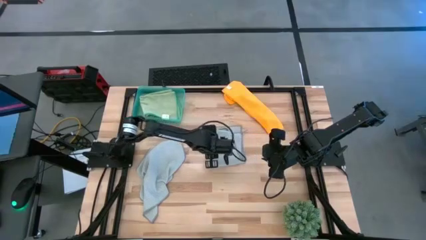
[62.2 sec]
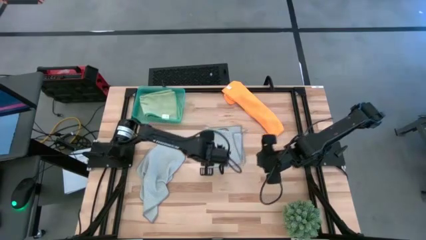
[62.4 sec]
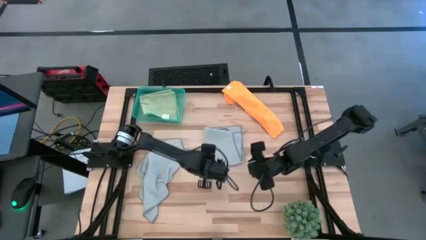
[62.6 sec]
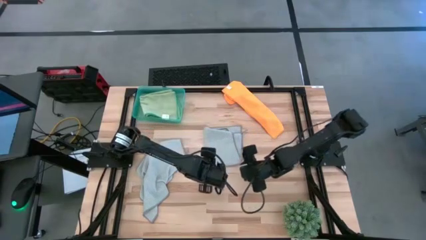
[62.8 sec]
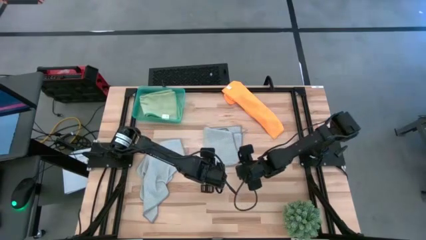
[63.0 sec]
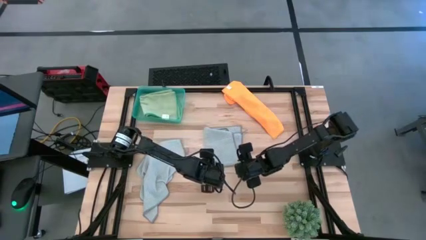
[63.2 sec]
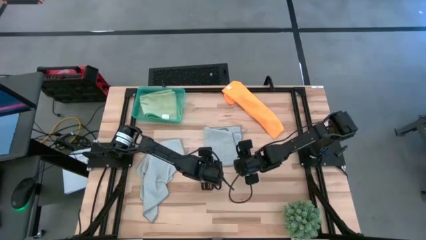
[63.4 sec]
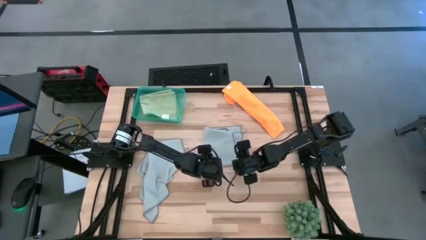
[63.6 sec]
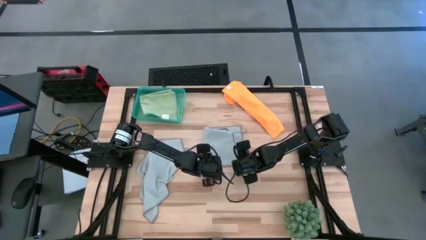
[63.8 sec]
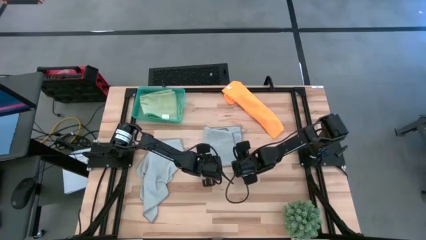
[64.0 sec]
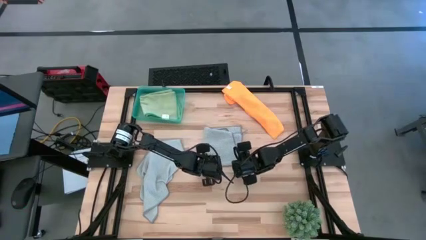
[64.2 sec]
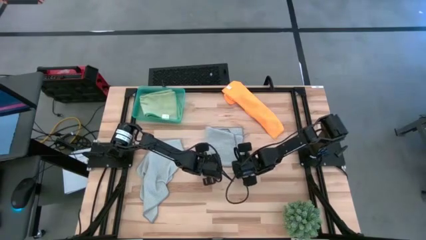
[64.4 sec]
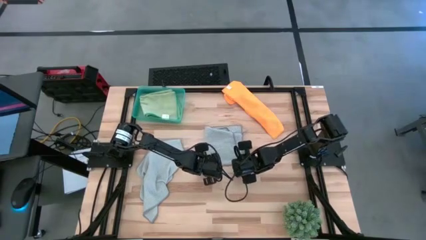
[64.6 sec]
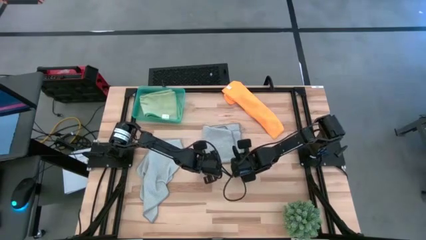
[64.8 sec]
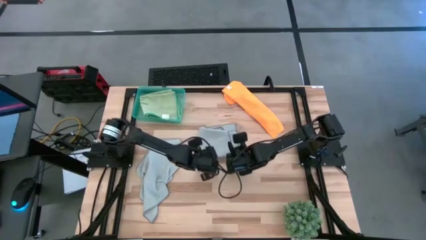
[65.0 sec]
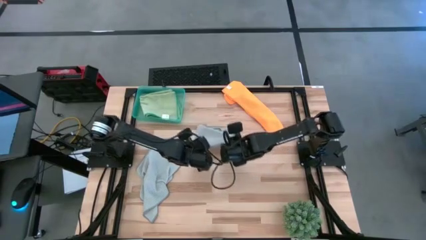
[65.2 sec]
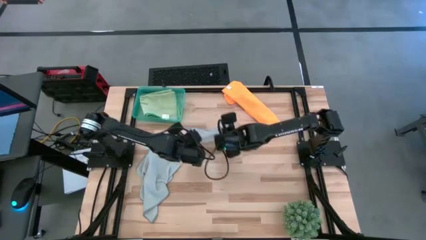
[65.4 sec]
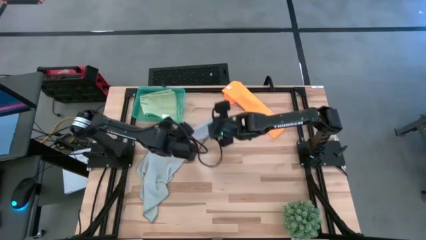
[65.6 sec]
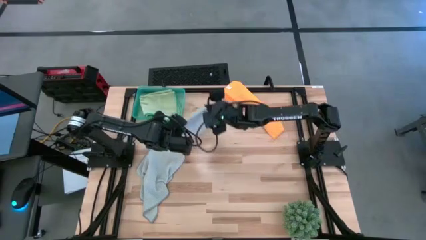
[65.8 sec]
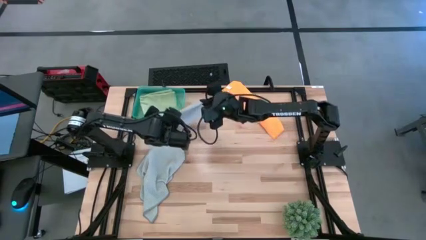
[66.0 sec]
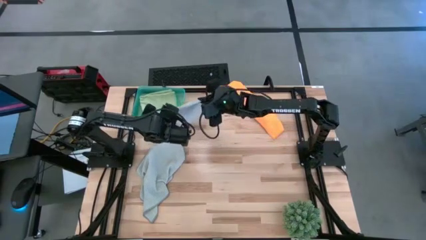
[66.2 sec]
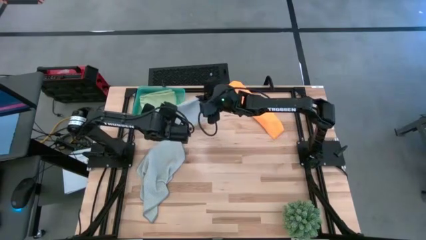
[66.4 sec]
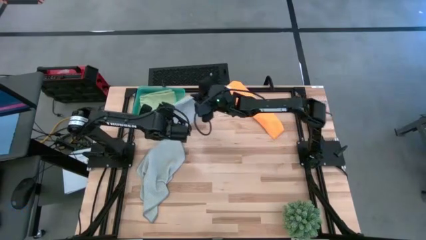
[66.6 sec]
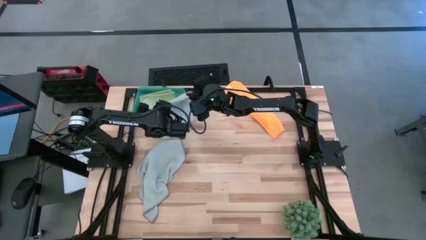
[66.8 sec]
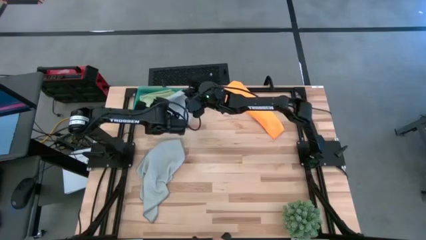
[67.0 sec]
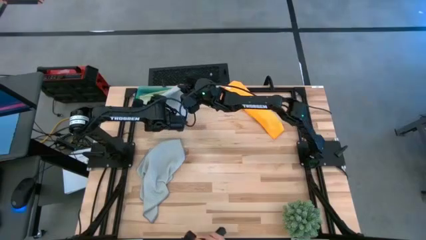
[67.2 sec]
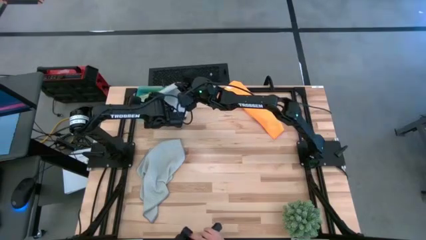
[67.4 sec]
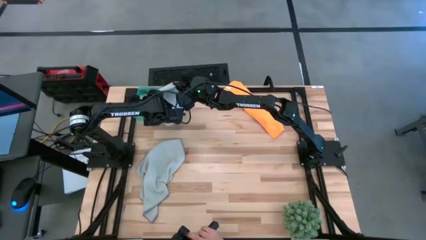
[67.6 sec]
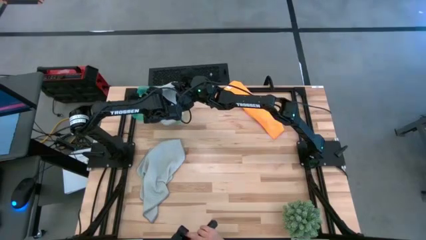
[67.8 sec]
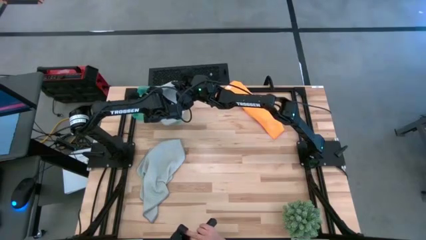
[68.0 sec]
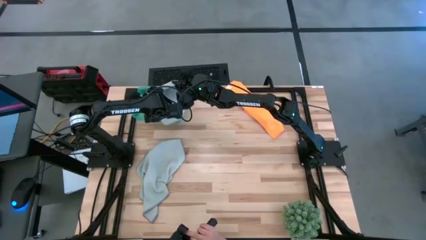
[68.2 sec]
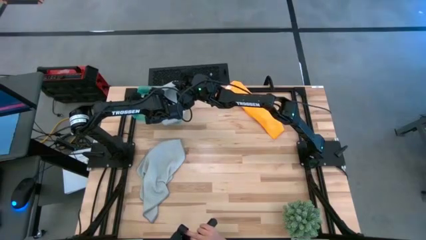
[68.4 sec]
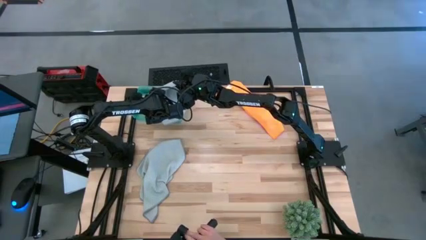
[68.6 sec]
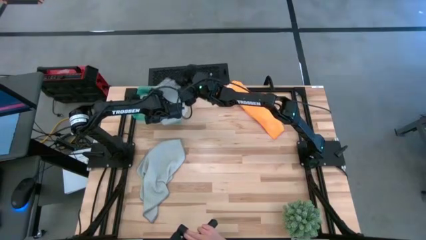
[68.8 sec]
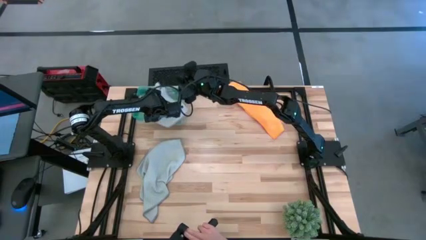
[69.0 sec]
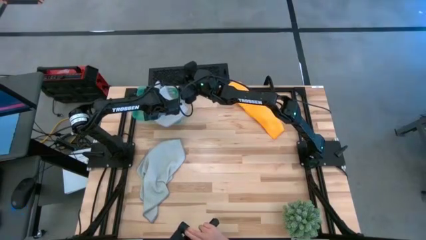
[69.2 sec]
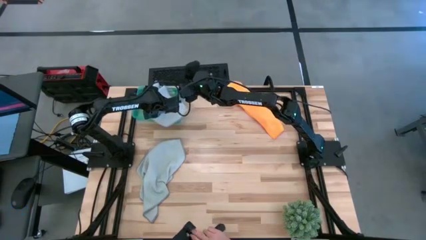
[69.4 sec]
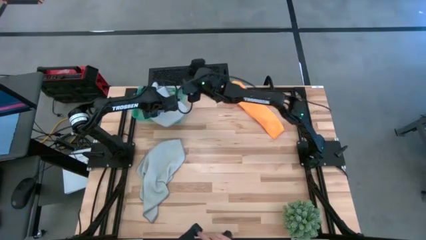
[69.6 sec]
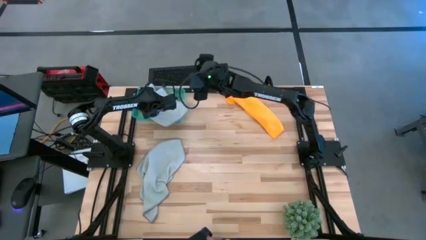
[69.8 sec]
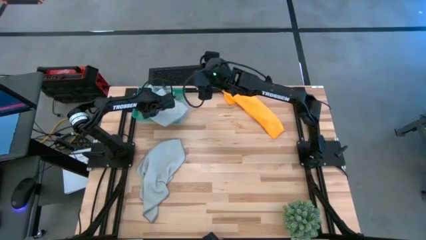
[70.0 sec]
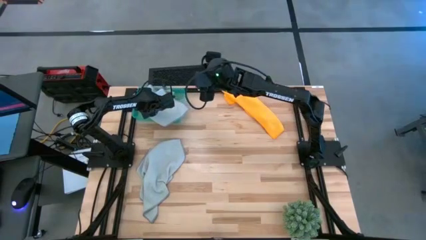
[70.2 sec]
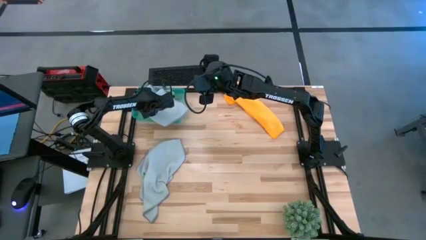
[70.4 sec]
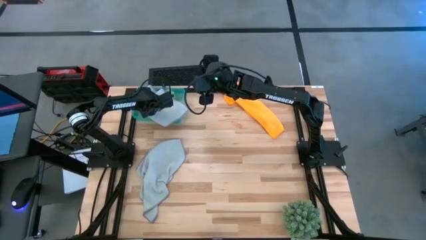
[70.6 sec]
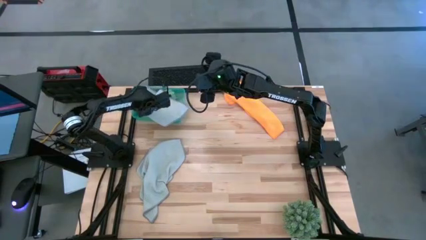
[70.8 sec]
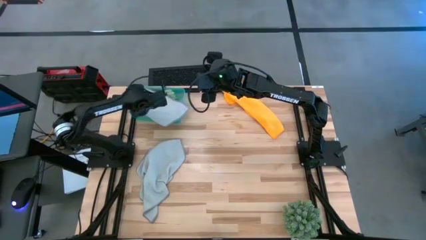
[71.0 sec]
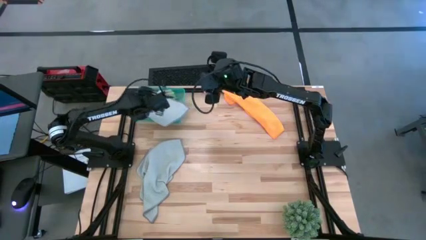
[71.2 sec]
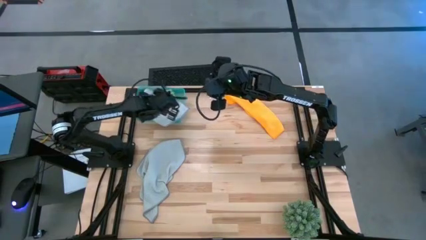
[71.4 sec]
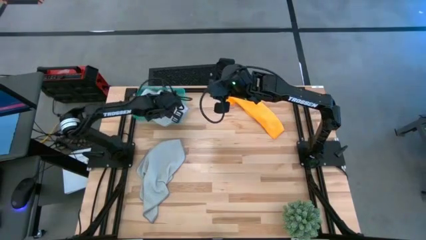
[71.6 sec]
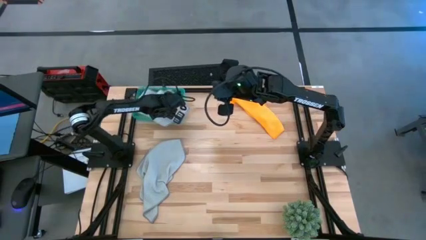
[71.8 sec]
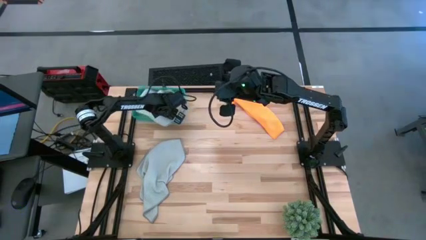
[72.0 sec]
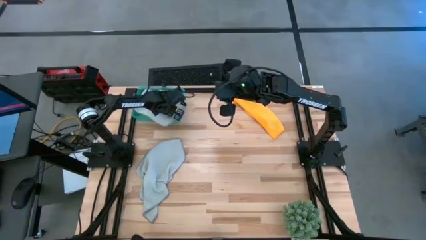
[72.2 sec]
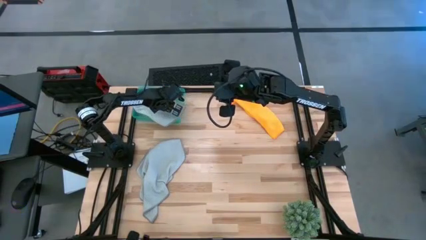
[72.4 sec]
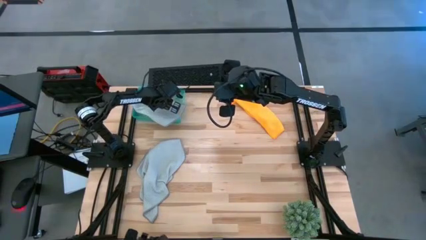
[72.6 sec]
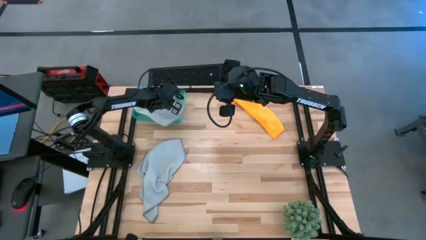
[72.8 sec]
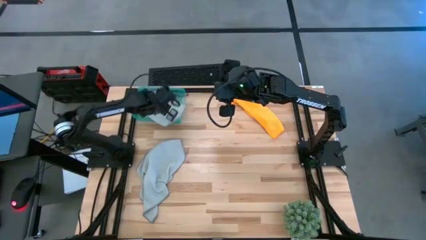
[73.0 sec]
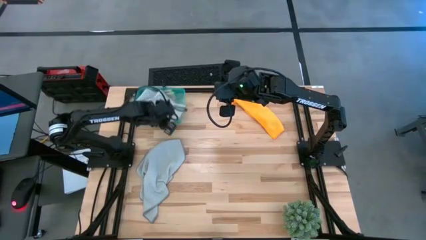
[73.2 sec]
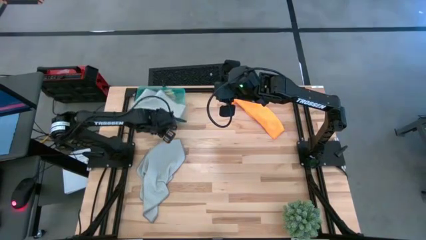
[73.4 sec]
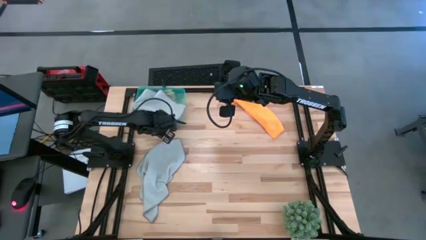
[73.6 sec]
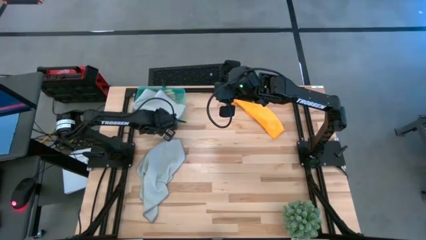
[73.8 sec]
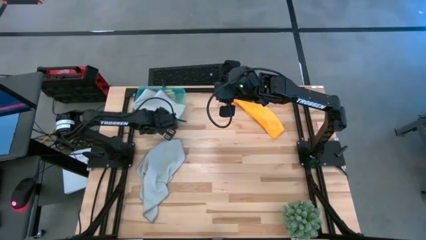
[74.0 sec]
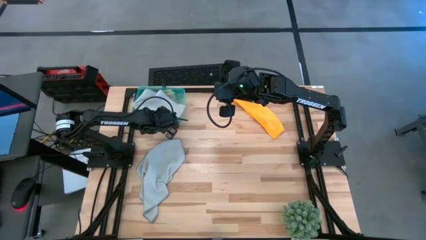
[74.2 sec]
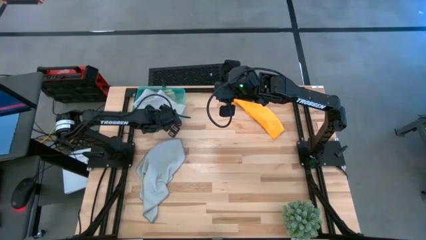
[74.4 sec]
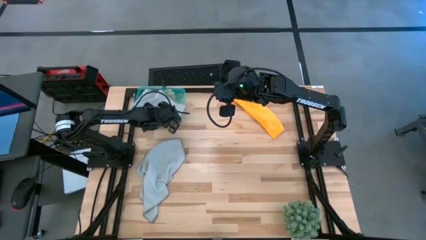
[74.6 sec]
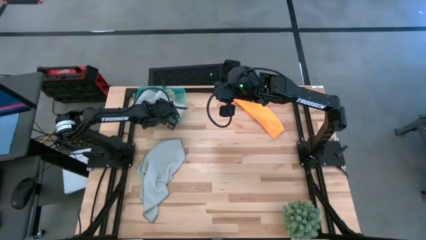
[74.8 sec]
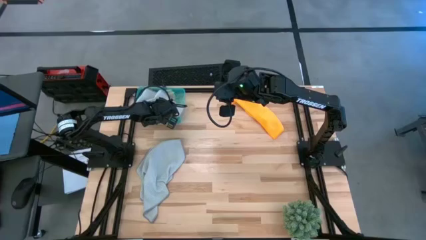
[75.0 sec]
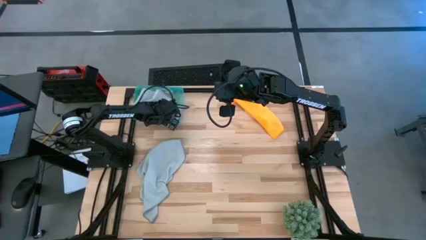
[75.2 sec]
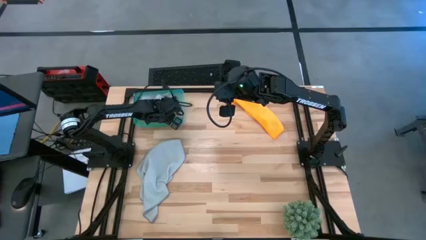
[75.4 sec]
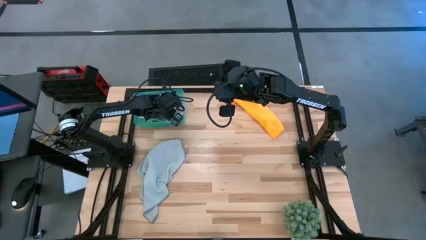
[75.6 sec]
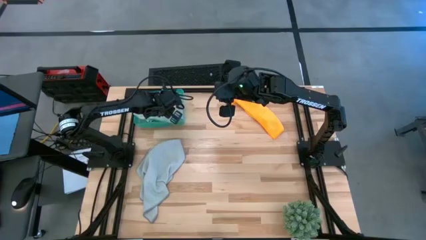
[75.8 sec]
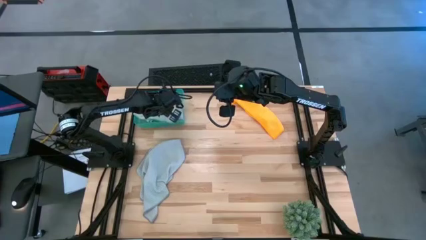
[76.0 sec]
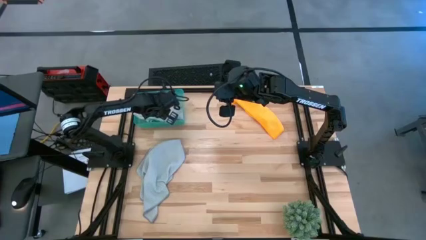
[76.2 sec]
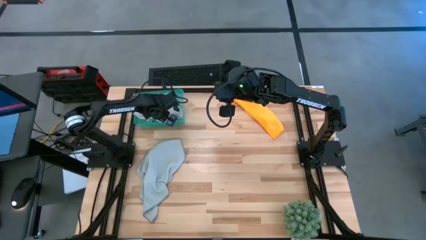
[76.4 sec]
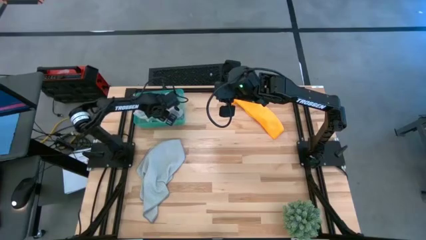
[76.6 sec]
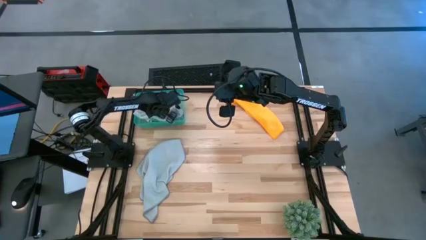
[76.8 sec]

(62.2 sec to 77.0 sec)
Task: Fold microfiber towels
Put the folded gray towel into the bin

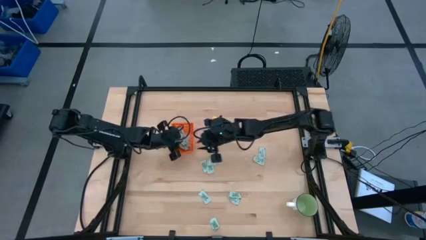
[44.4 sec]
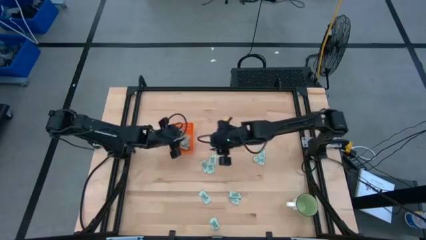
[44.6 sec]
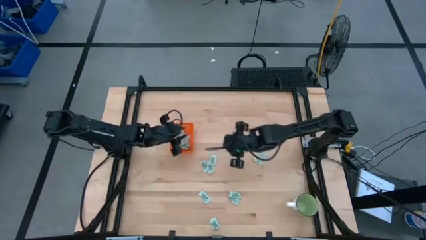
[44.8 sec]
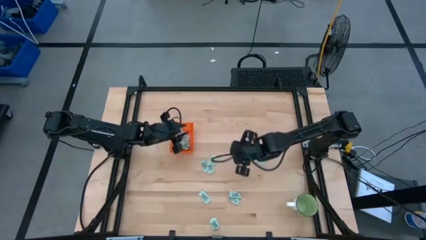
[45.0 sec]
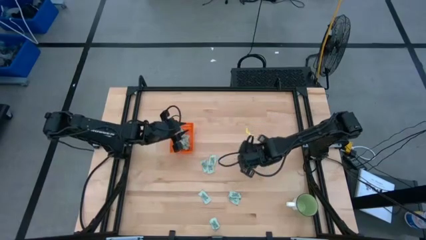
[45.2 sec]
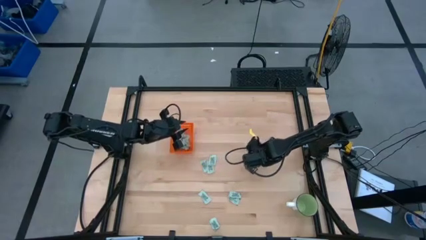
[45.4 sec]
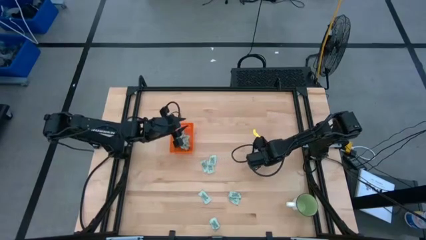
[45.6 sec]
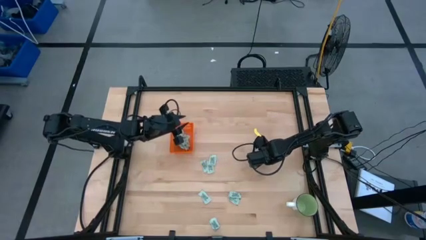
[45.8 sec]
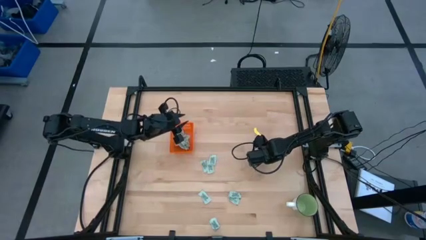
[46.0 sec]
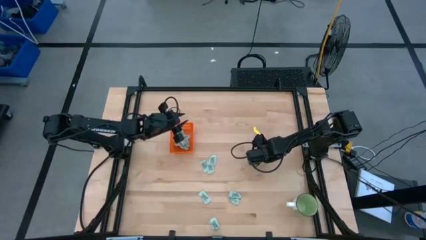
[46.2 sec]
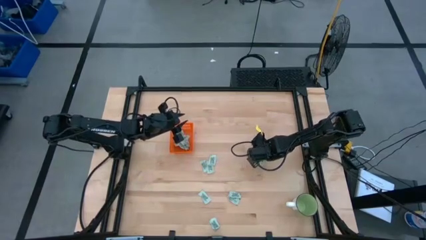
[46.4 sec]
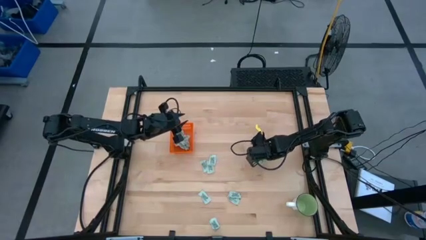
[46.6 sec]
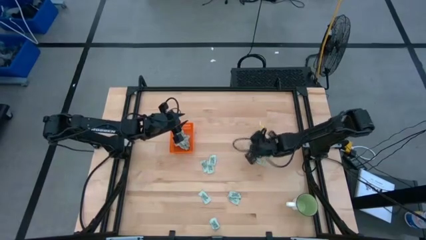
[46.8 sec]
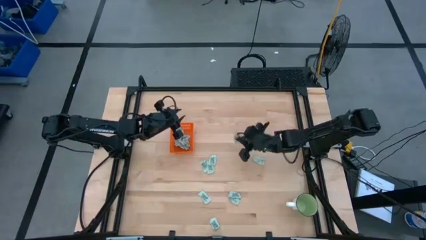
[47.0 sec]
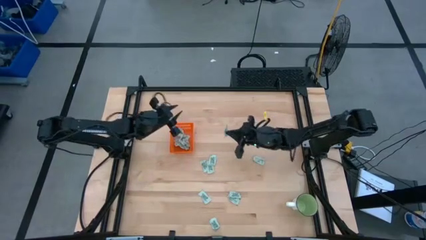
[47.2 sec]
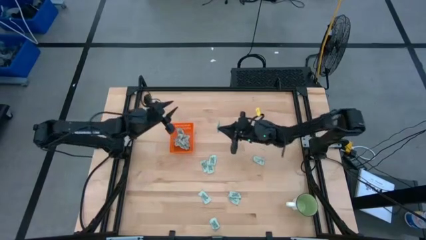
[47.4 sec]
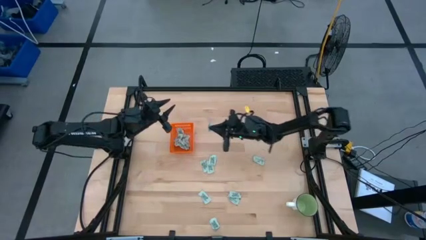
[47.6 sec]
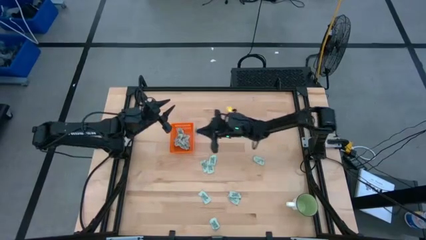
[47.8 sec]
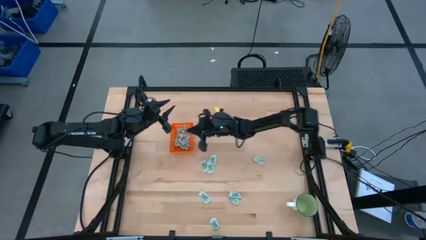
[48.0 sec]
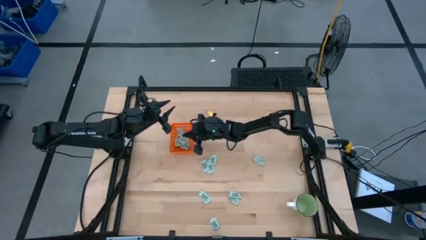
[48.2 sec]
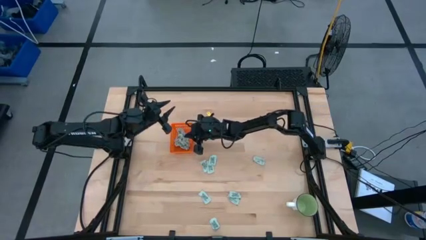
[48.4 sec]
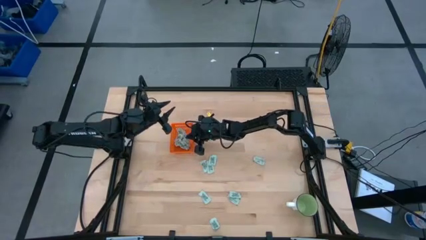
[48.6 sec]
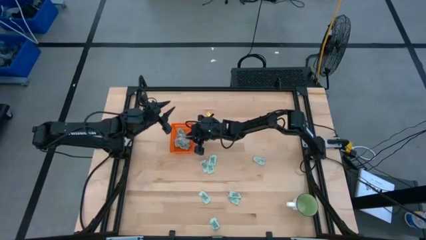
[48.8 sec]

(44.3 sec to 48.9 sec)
Task: Pick and place Stevia / Truvia into bins
Put the green stevia packet into the orange bin
